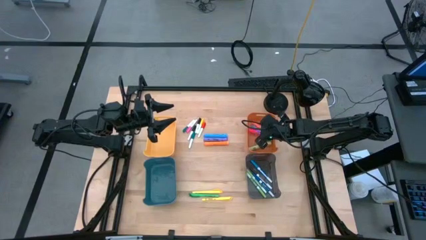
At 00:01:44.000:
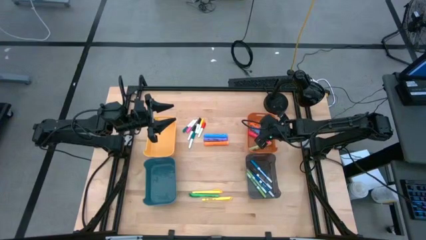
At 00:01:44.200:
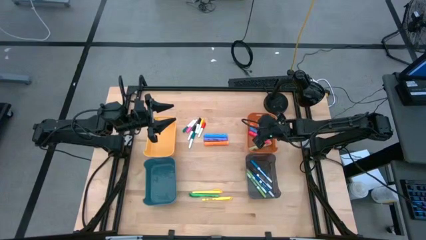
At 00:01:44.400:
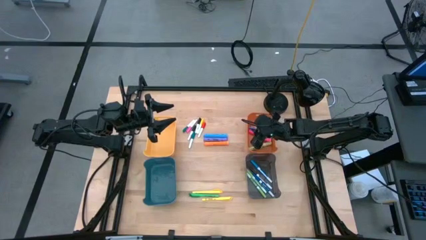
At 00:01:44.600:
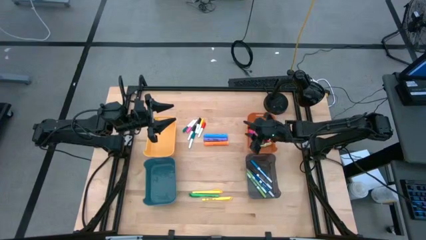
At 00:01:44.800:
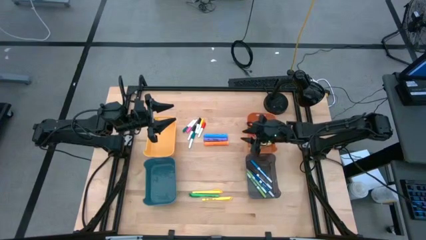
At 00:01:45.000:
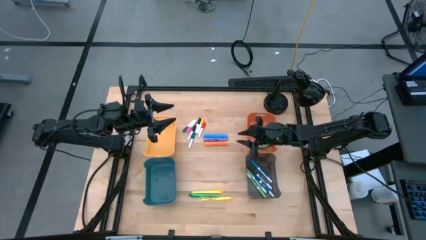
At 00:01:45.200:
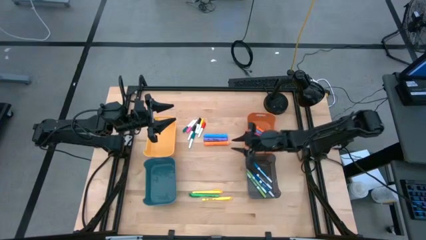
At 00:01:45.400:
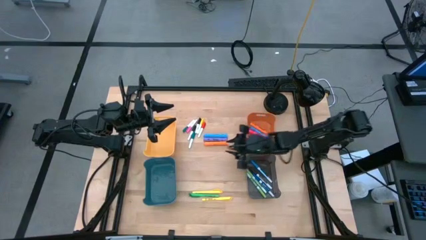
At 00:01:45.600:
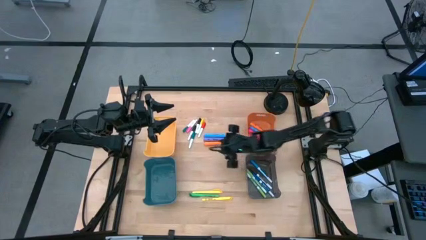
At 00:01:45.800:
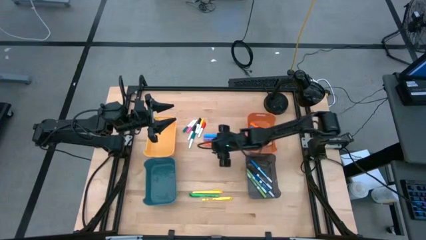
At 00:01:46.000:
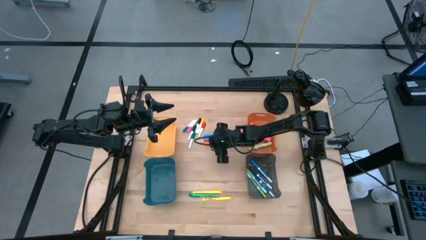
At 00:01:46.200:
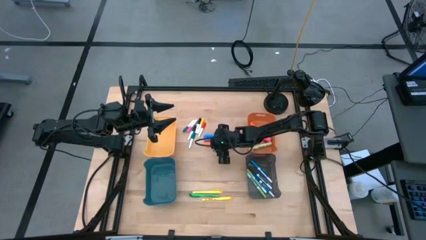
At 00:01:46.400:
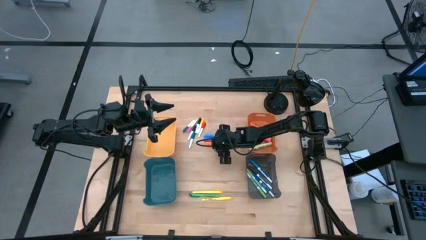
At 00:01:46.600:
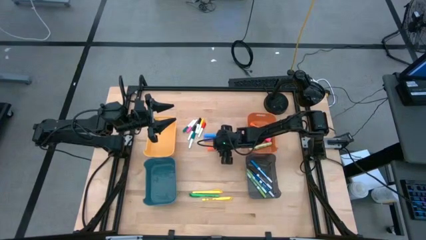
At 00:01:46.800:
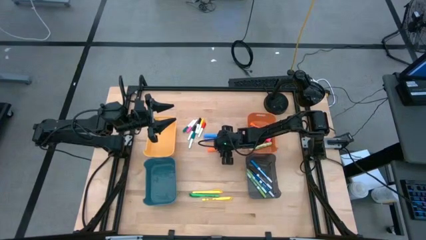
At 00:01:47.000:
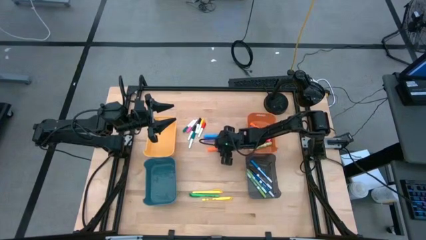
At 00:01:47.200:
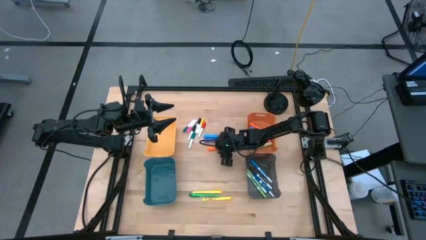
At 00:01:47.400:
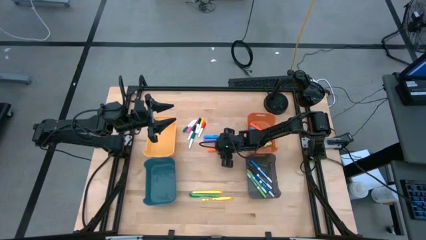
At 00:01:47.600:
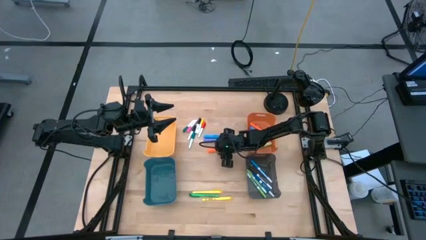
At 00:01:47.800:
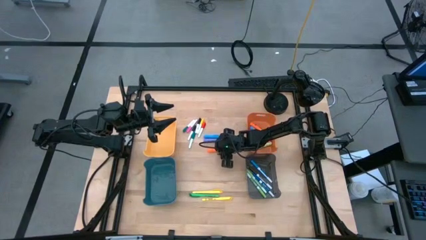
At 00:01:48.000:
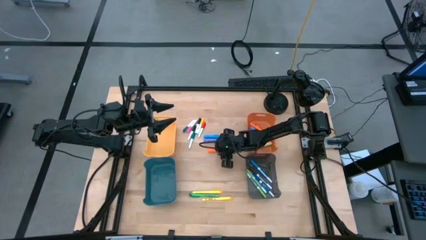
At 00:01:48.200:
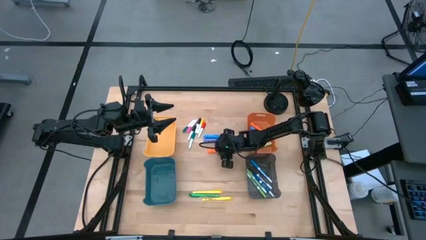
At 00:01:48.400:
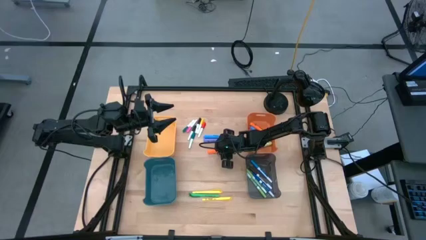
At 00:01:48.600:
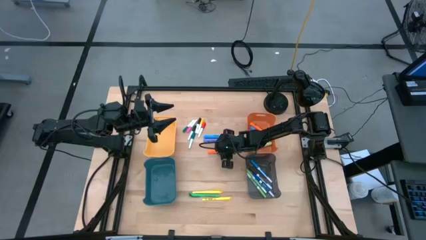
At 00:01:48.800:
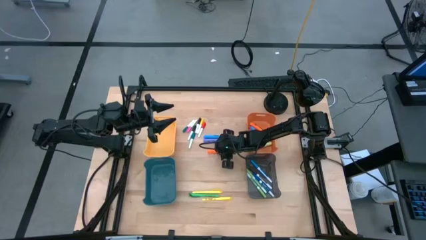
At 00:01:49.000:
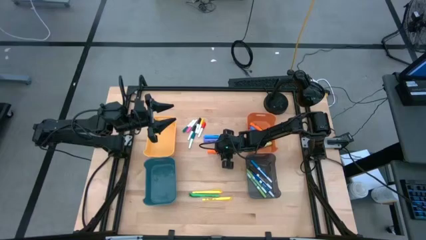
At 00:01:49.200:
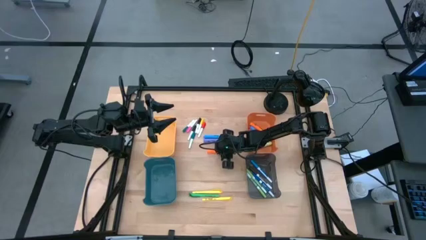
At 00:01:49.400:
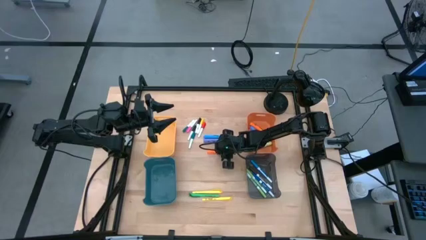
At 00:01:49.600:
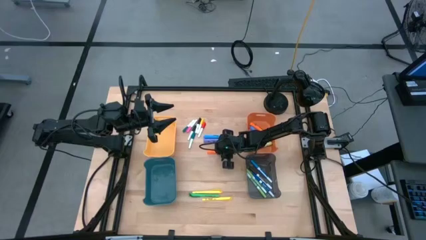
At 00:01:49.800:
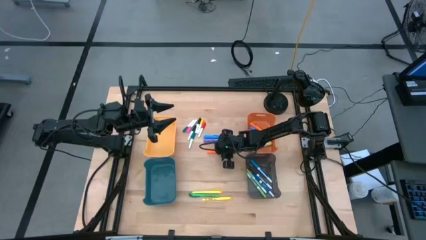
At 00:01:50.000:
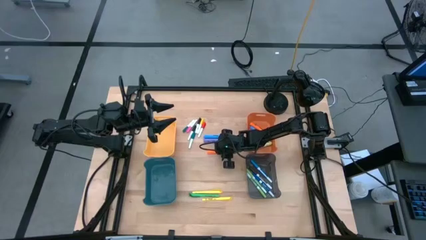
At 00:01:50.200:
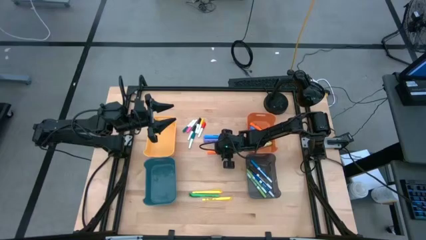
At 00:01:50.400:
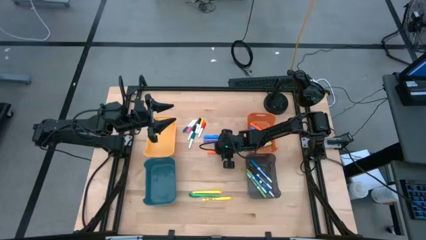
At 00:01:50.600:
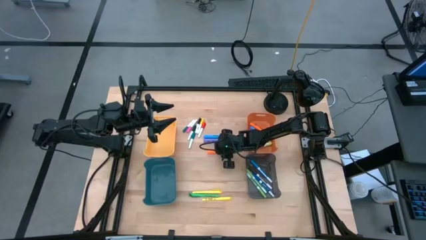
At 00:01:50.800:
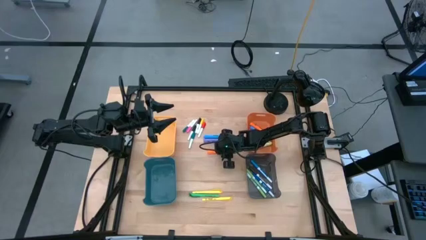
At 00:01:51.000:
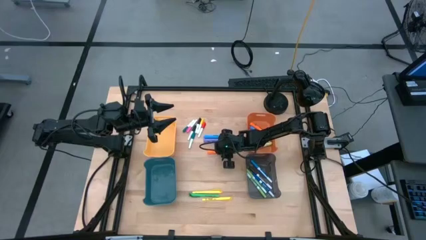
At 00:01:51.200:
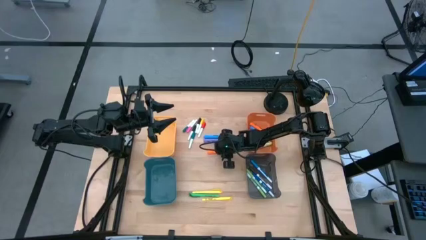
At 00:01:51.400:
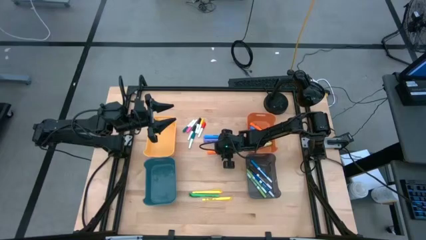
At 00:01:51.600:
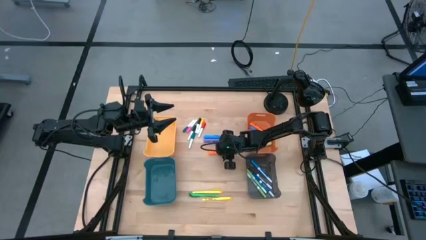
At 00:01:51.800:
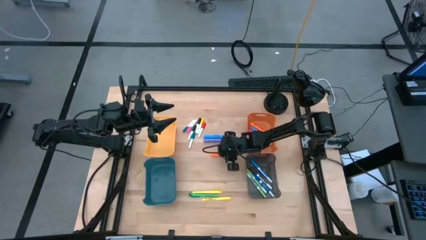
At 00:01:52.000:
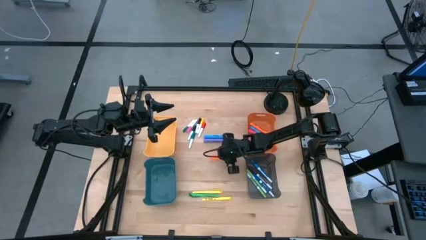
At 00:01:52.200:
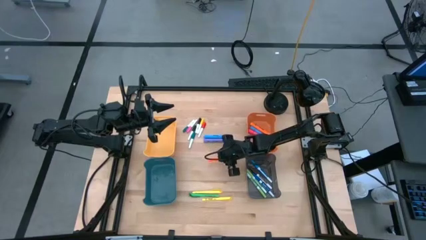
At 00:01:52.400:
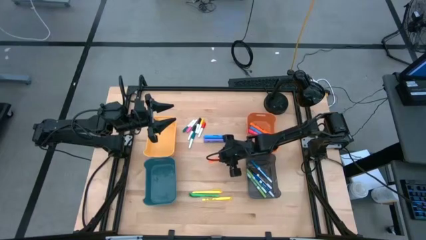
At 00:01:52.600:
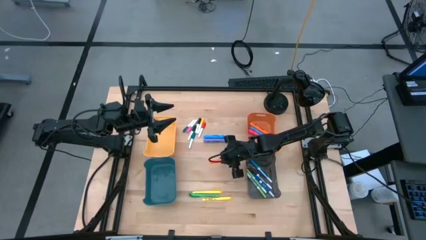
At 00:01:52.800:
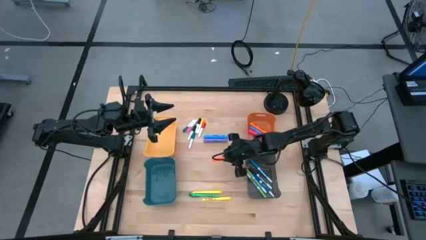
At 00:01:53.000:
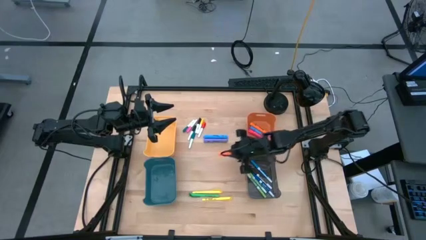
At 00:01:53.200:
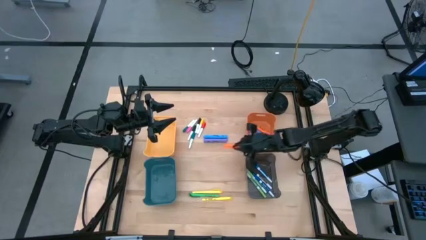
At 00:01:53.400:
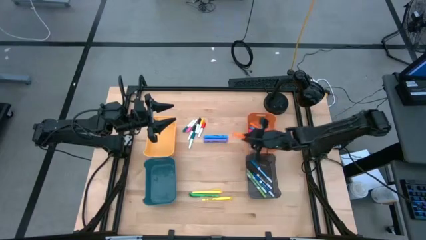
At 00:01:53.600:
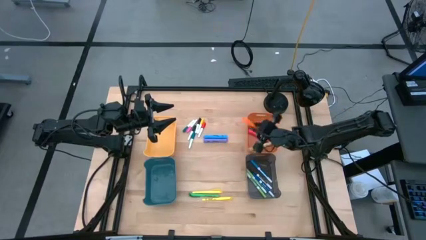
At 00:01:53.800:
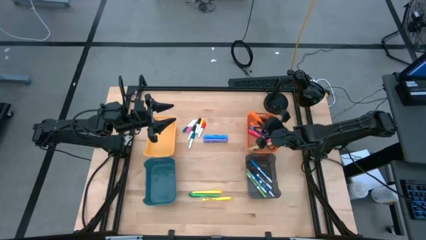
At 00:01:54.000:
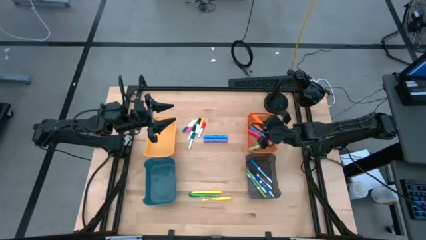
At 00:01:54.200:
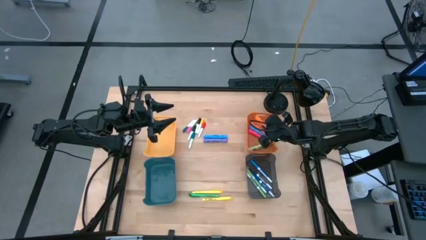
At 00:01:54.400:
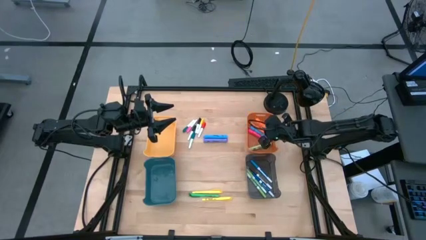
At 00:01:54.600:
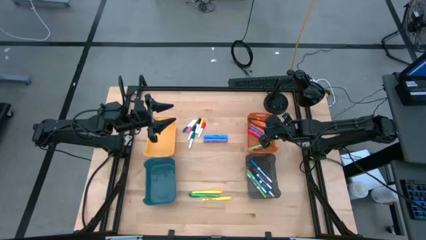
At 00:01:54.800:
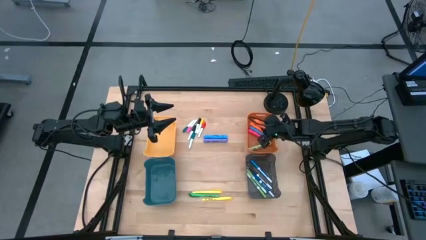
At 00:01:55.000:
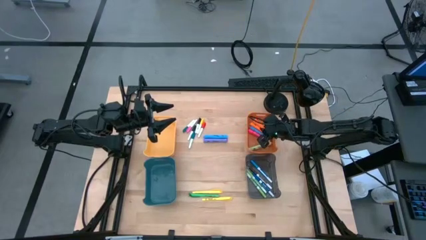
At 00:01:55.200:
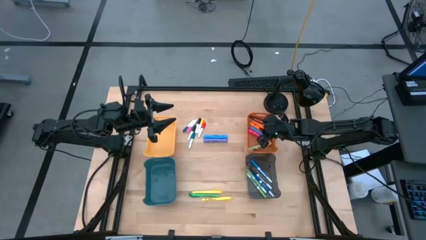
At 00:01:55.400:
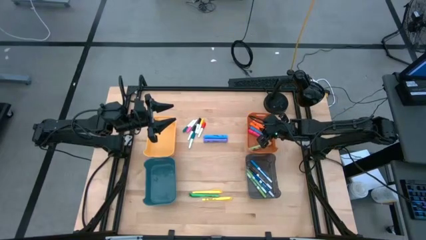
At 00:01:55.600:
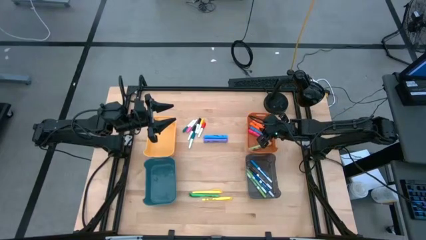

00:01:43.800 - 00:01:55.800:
Task: Pick & Place Markers
Put the orange highlighter into the orange bin

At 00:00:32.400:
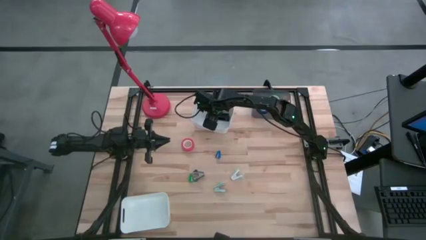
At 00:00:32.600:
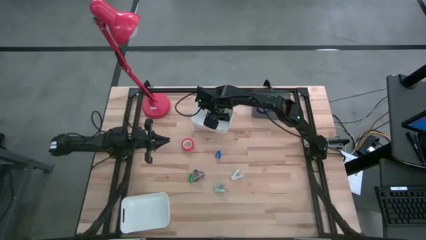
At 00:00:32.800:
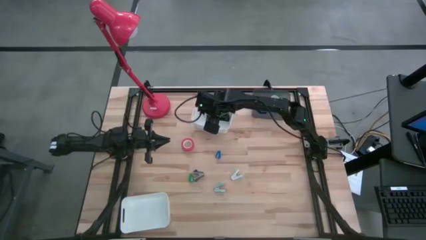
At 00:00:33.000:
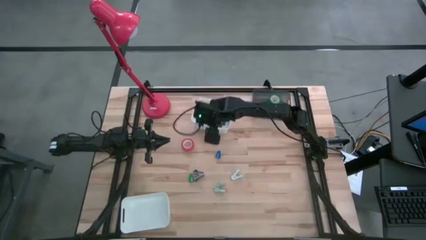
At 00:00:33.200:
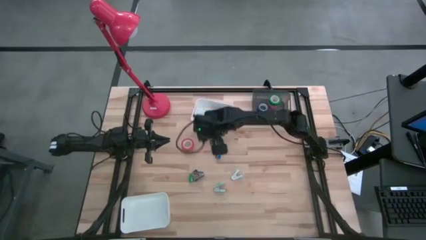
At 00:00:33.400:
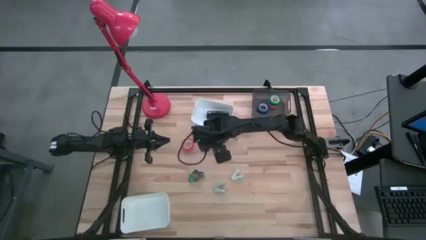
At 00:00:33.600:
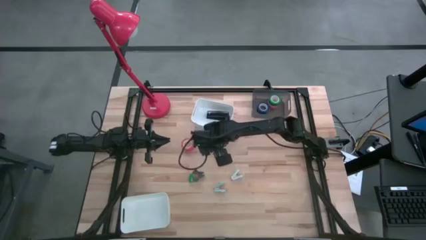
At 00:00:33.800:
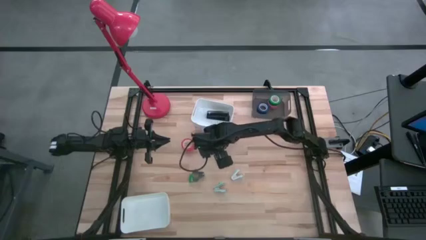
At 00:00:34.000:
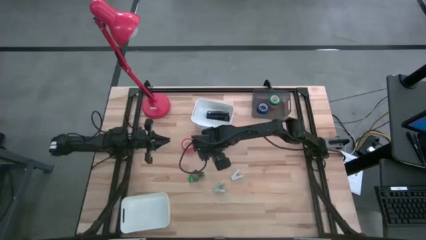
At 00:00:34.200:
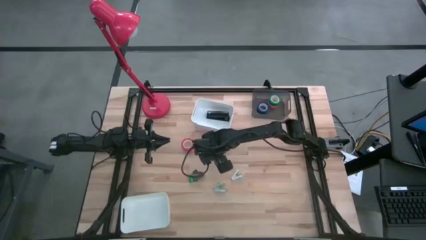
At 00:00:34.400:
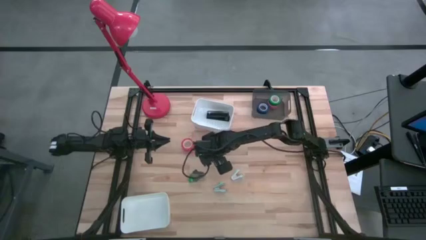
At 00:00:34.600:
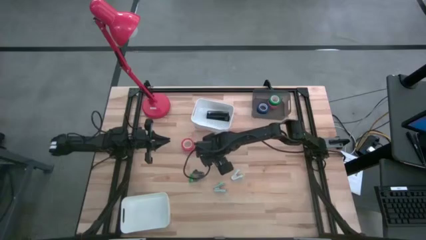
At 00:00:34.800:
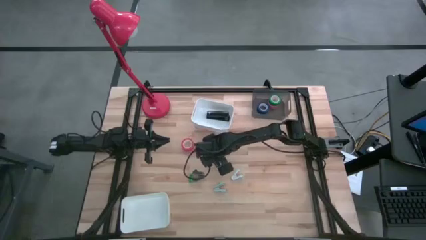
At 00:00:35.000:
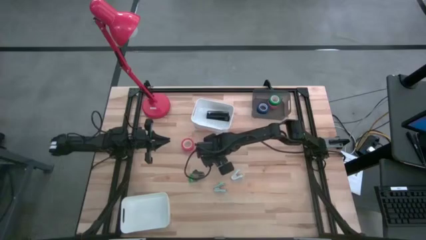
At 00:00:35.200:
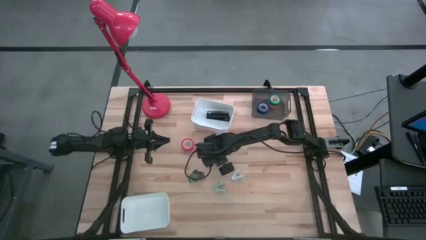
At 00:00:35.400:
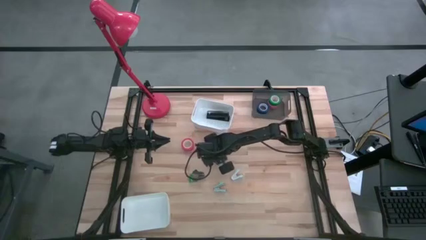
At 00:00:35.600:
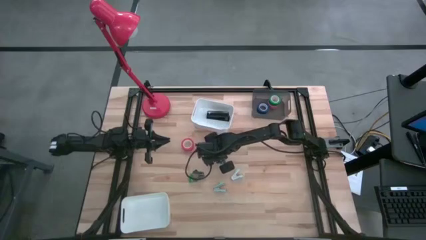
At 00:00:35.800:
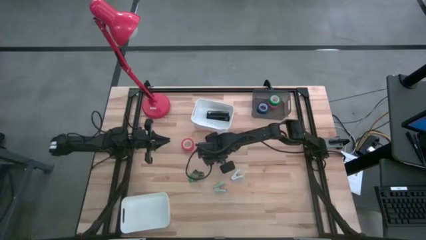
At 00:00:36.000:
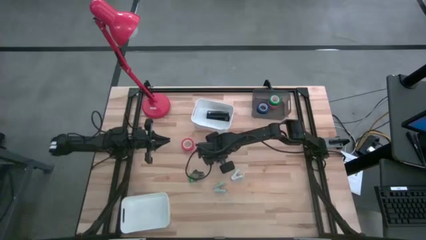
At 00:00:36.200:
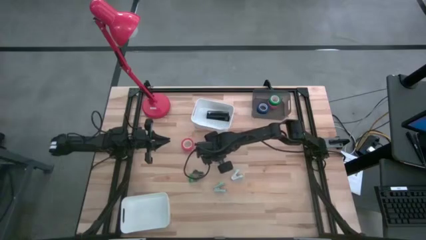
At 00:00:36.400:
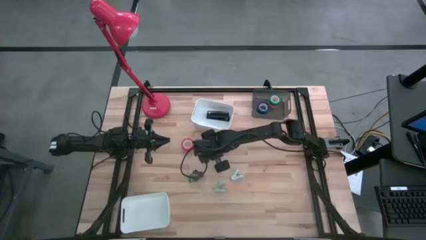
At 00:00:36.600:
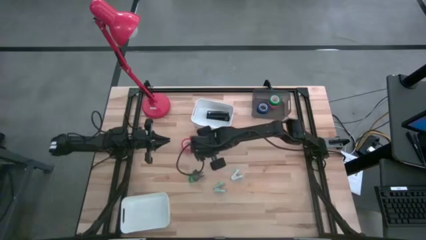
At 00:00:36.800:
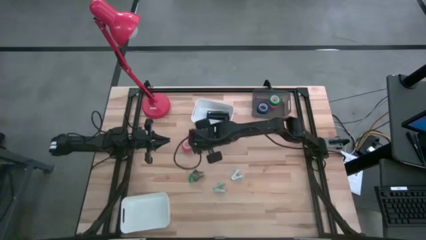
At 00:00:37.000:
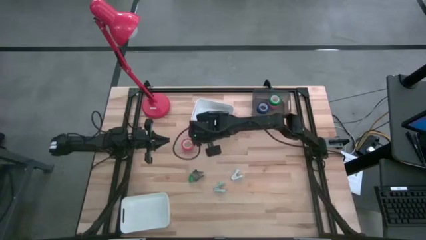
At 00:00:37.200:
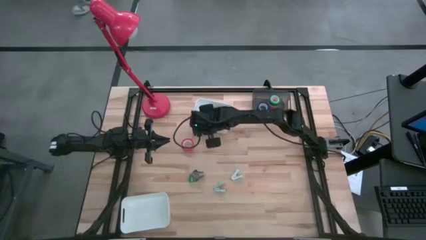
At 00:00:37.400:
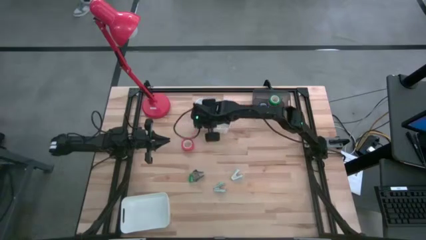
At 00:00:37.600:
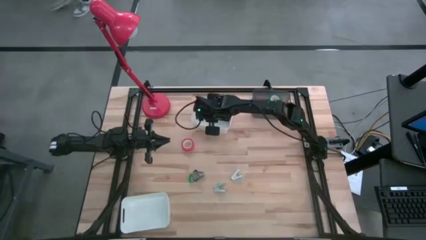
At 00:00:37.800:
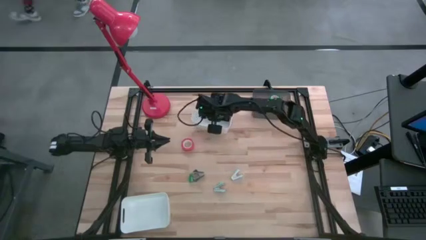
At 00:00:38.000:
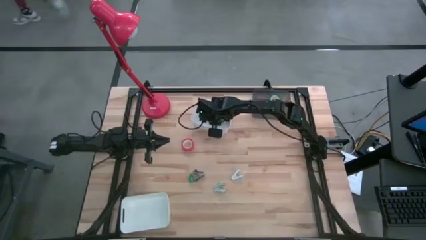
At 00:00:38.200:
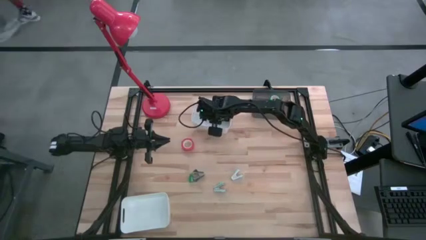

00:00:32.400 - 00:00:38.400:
Task: Pick and place Stapler, Stapler remover, tape
Put the blue stapler into the top white bin
